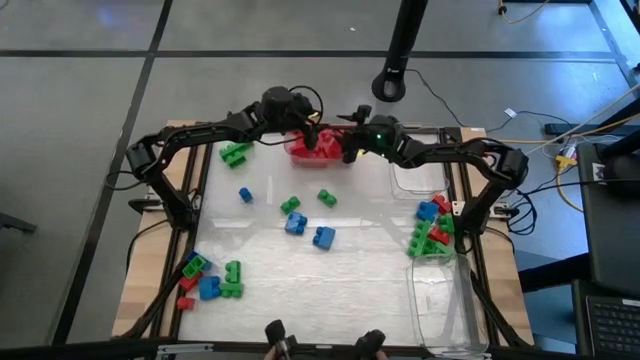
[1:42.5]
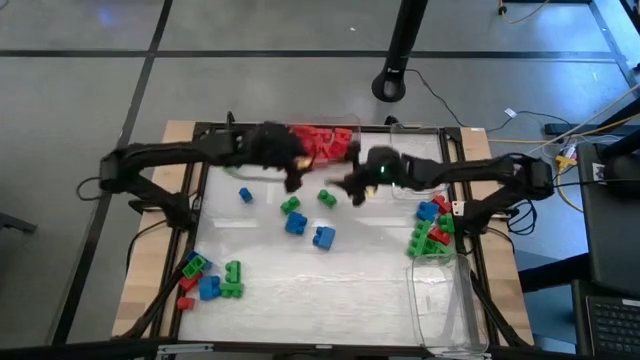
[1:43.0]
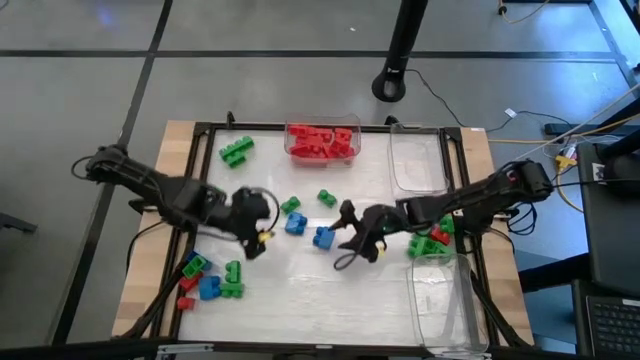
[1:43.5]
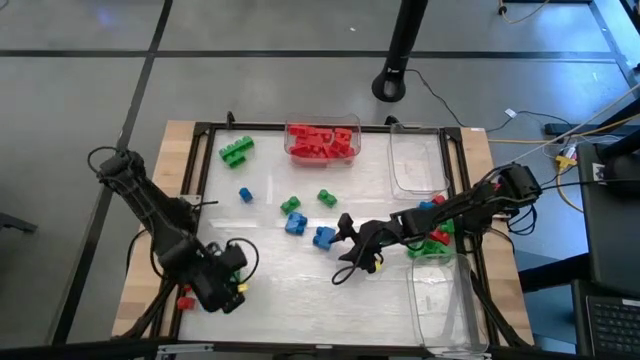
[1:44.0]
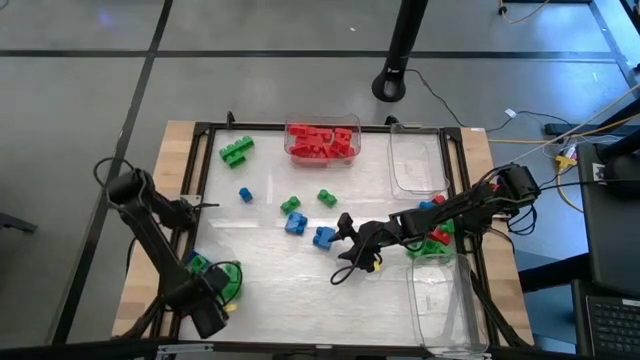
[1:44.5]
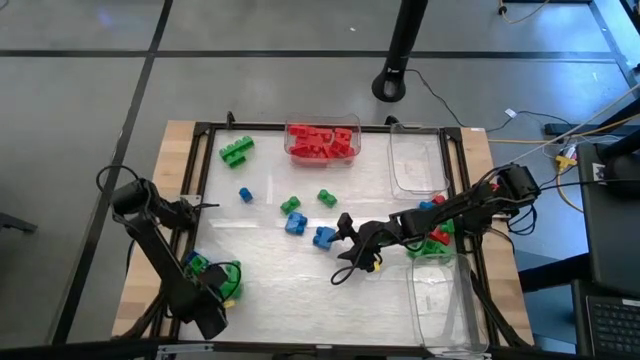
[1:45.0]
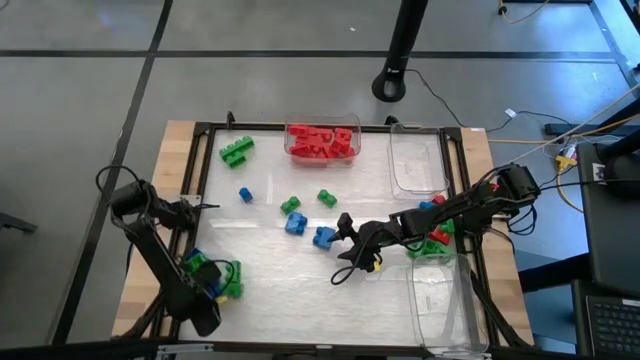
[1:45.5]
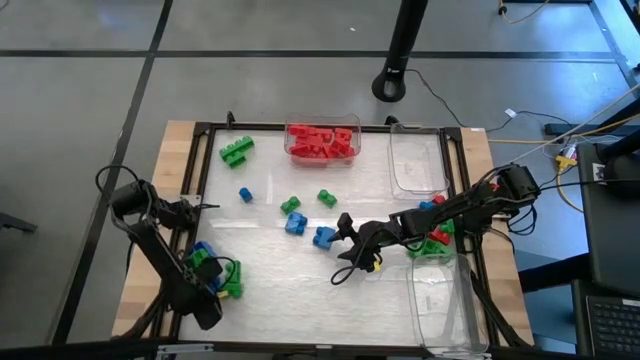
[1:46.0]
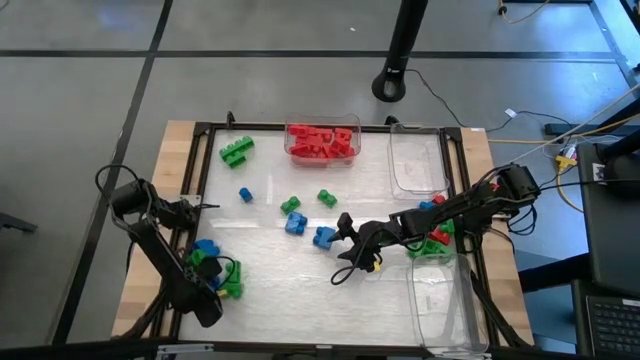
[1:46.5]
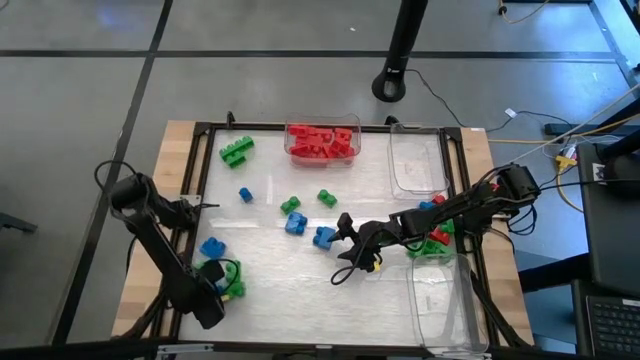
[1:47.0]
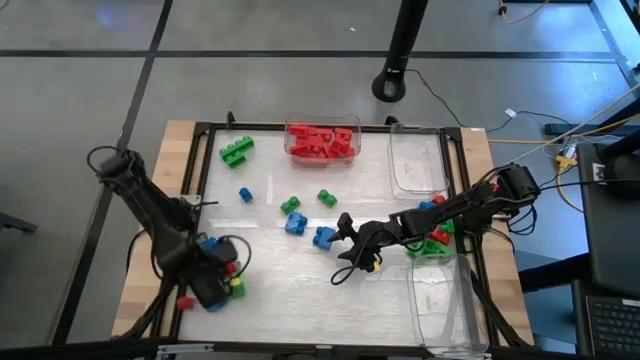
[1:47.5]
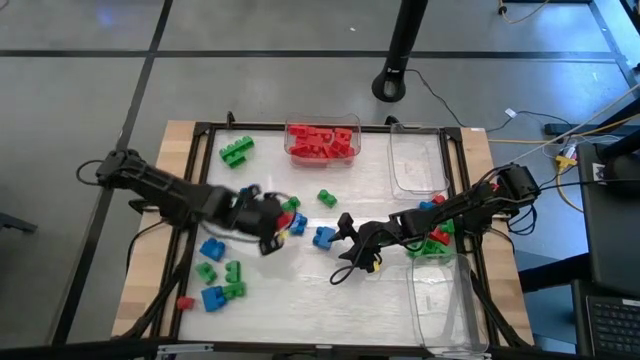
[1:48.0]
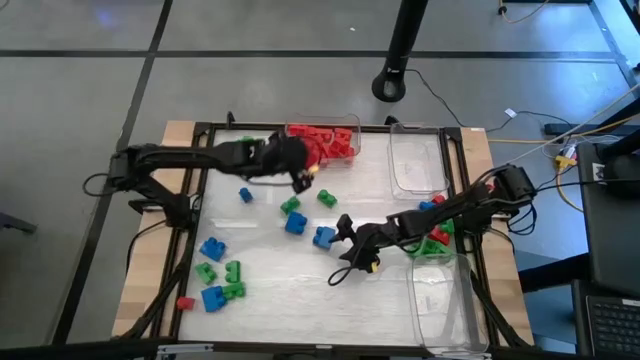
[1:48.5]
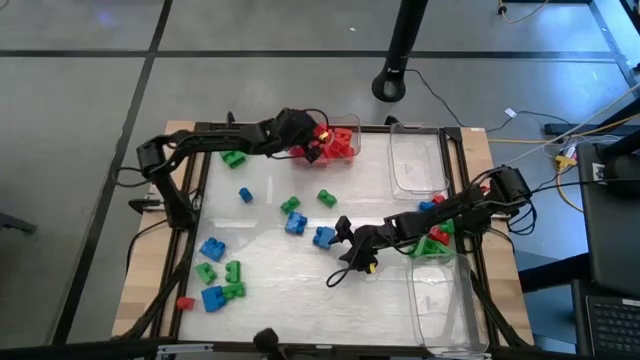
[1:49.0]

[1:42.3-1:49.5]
Task: Sort blocks
Put the red game piece into the top left transparent bin

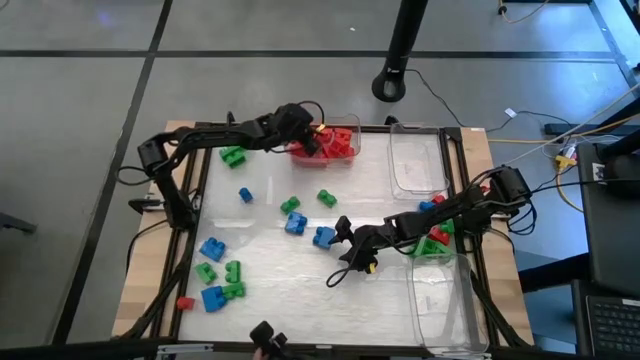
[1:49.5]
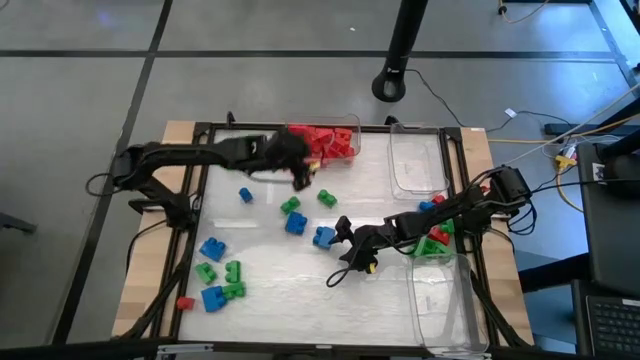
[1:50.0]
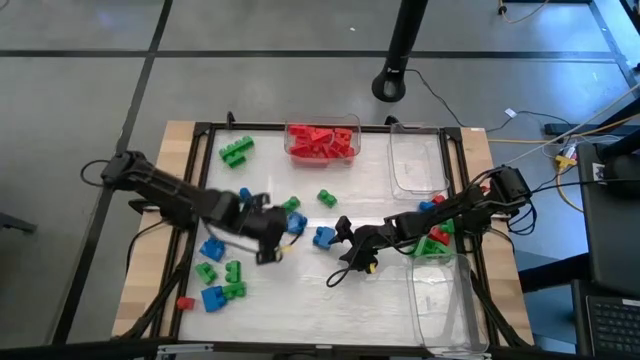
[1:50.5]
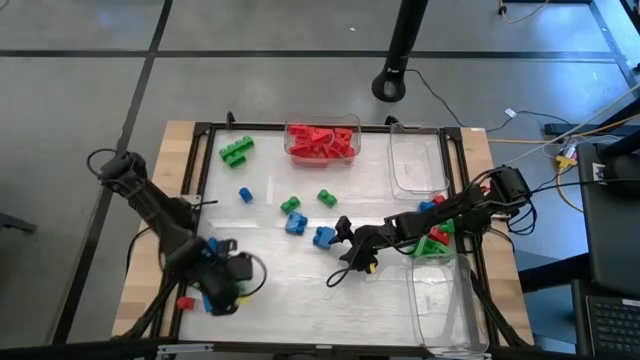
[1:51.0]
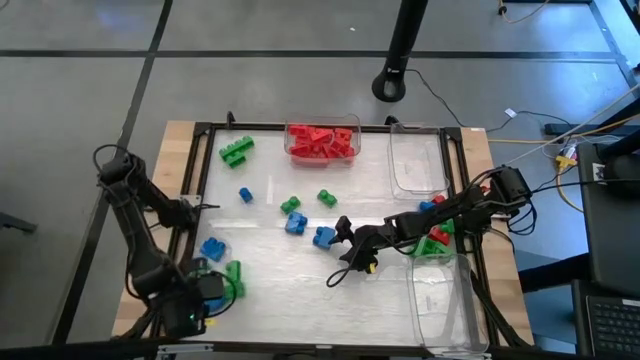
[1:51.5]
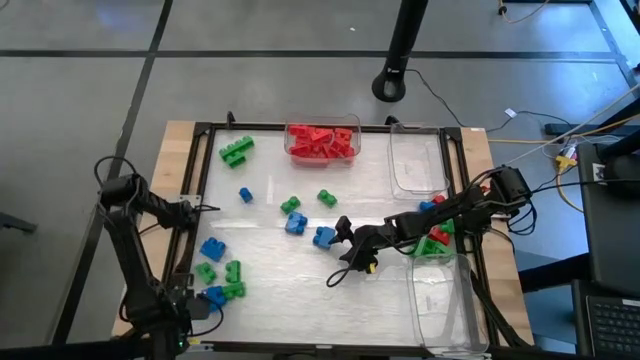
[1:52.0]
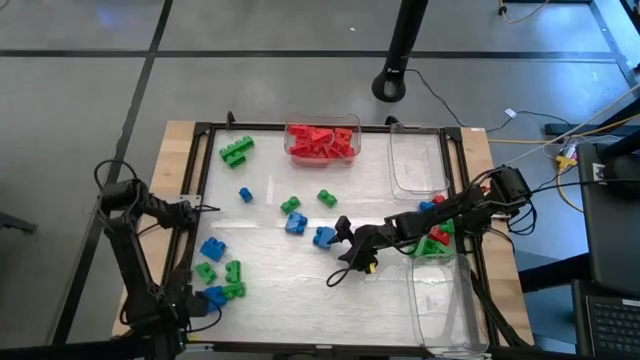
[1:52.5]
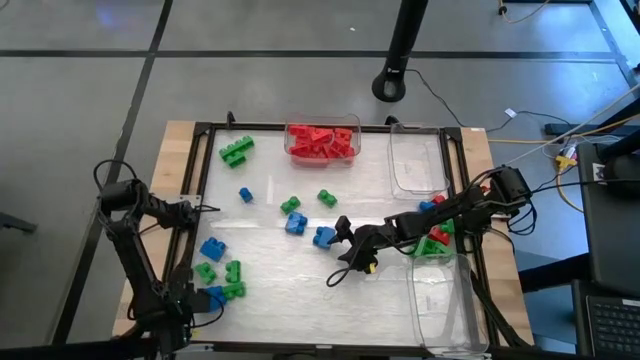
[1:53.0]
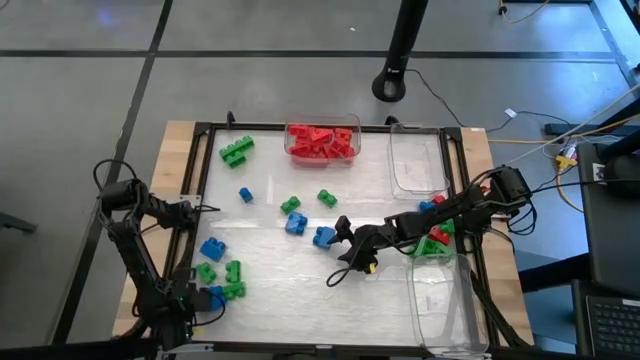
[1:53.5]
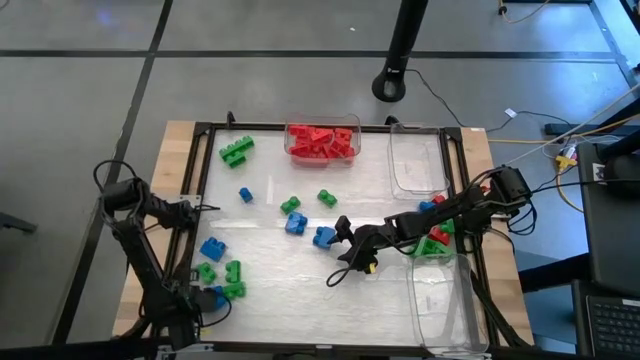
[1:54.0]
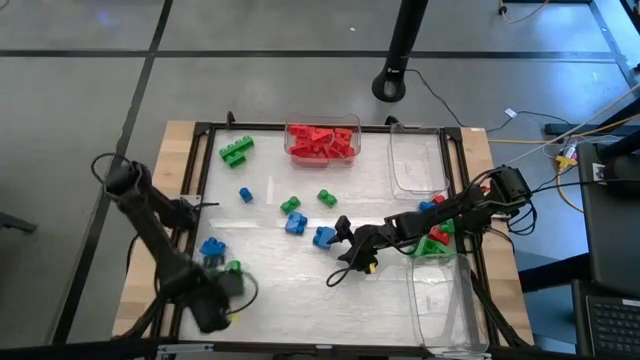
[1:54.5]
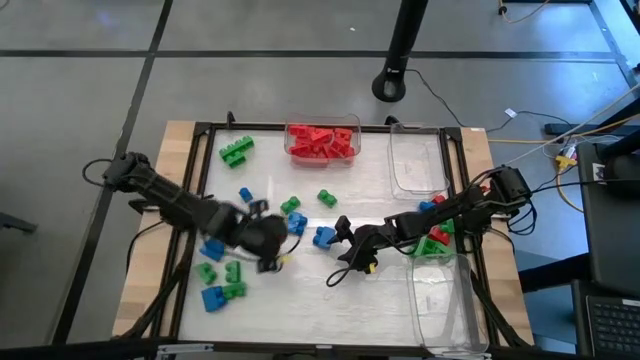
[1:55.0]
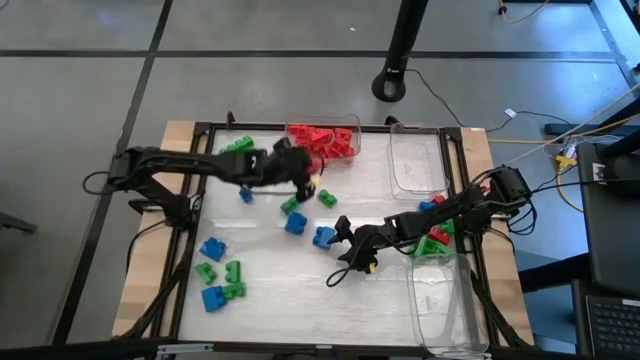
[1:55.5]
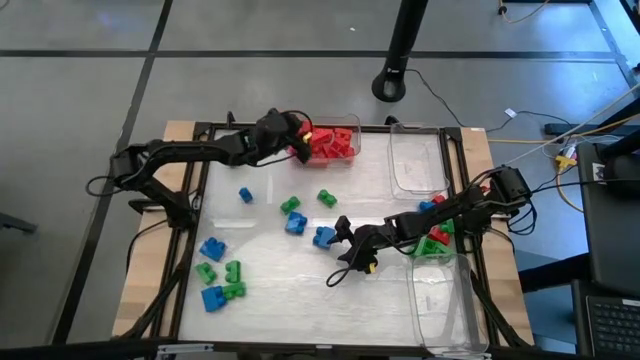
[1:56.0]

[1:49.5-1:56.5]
Put the red game piece into the top left transparent bin

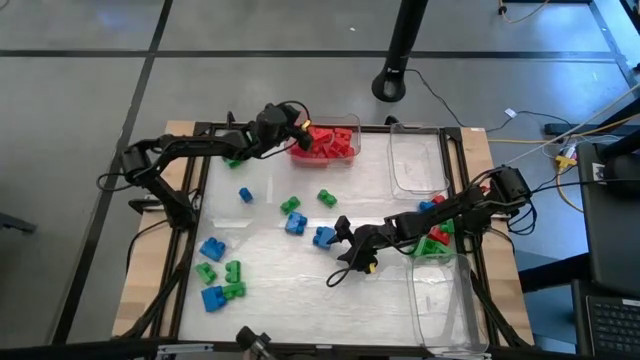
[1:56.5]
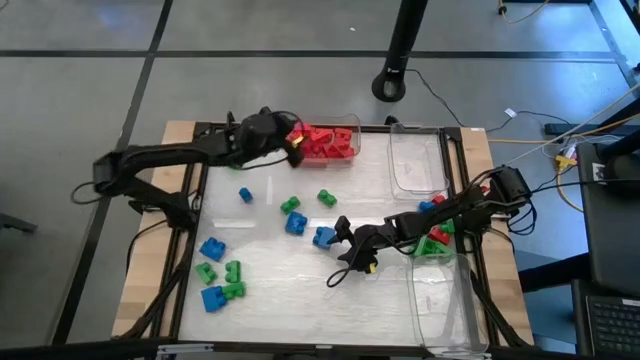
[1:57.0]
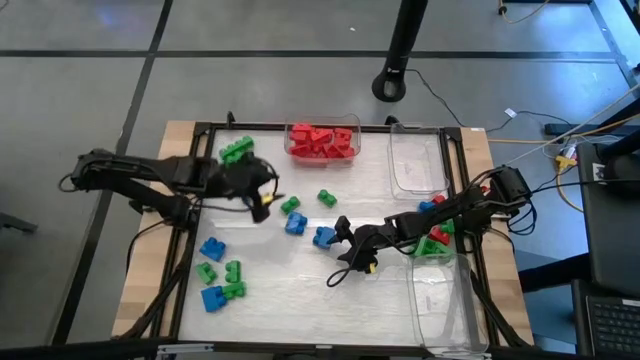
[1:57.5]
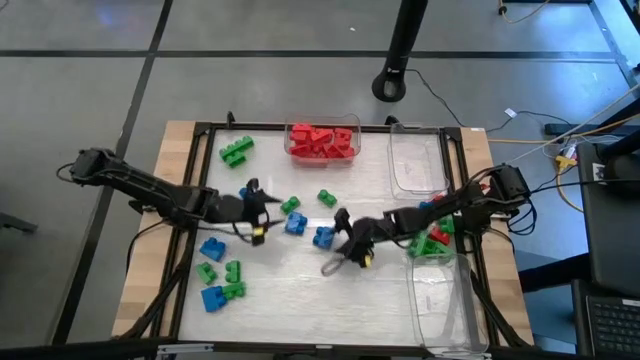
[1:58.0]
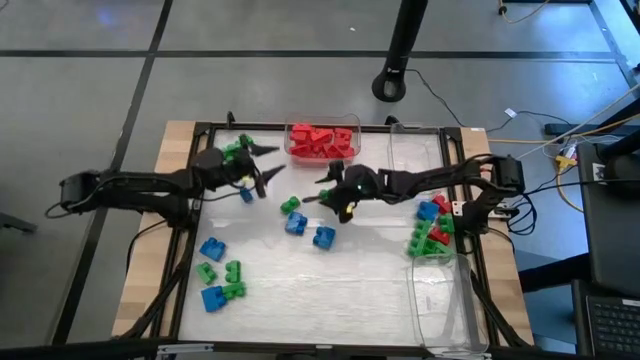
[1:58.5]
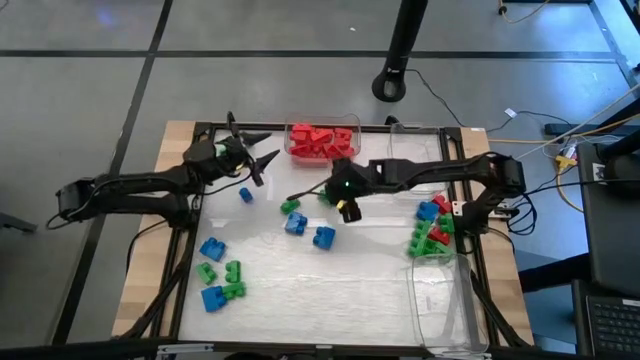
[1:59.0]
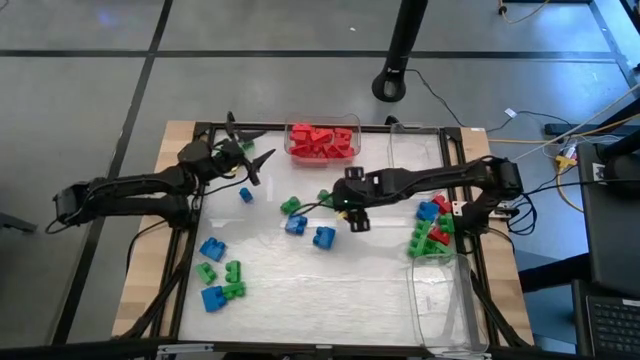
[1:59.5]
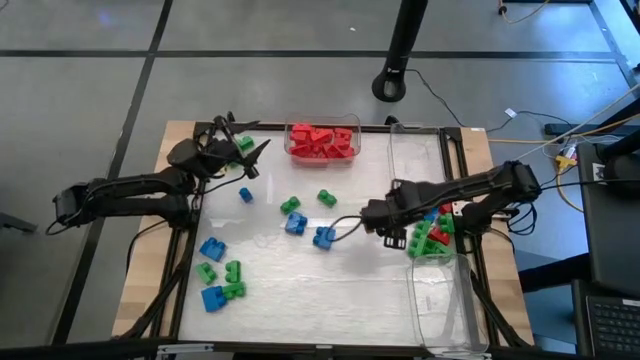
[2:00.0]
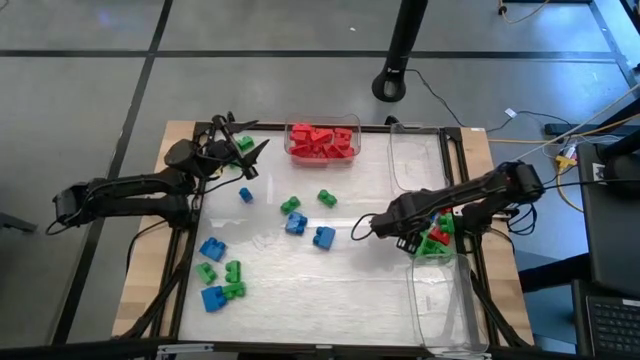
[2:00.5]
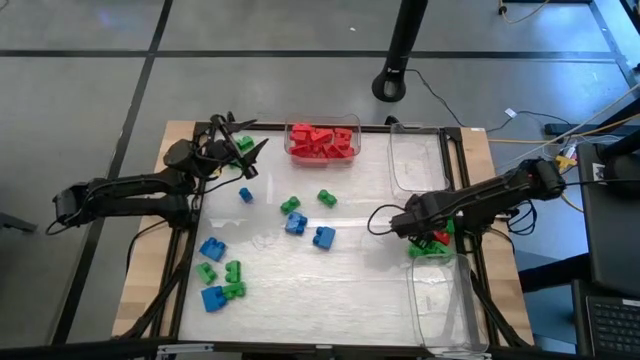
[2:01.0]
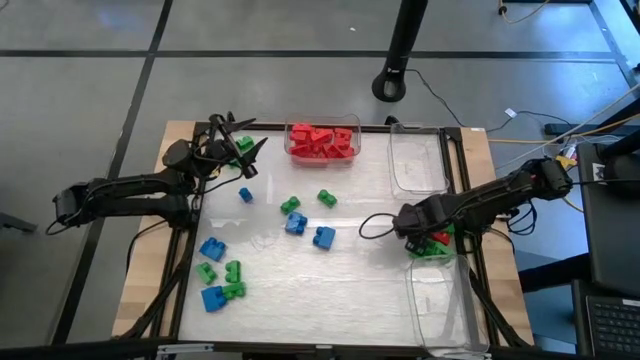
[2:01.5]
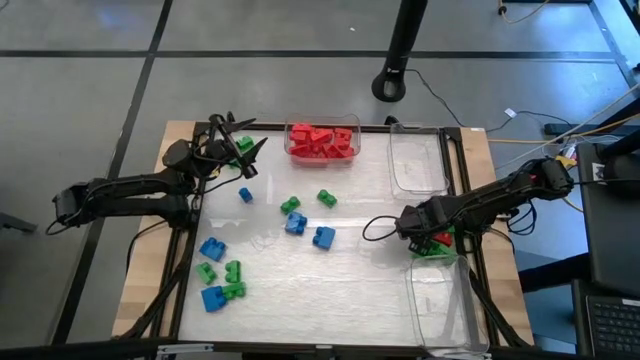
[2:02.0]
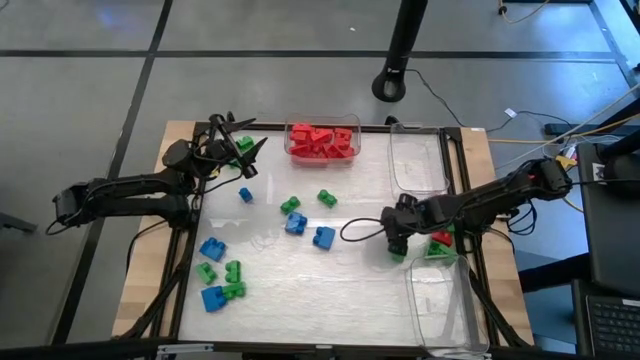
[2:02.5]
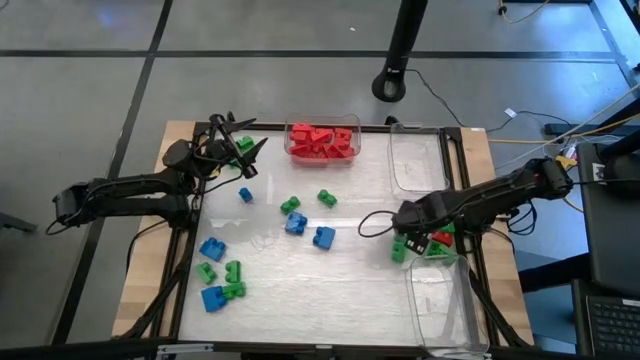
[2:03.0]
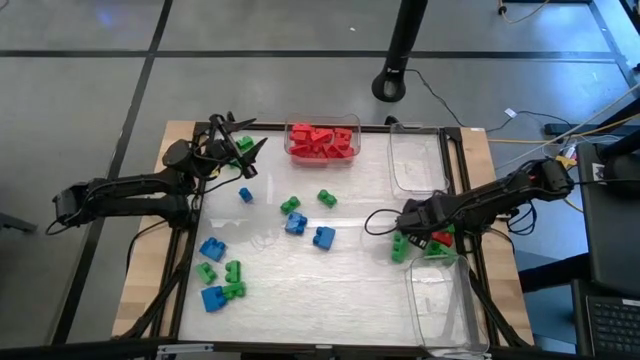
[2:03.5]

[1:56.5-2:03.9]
Adjust the game pieces
